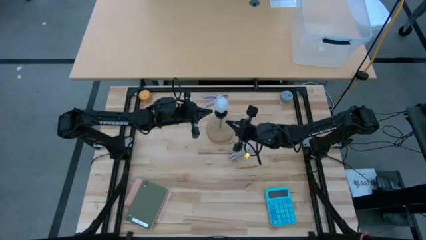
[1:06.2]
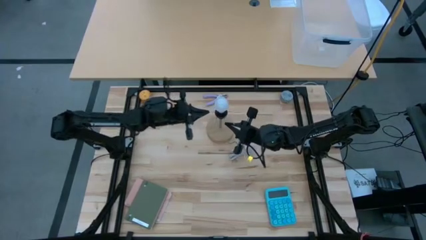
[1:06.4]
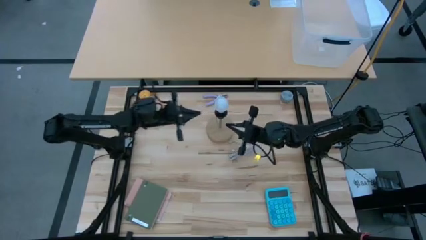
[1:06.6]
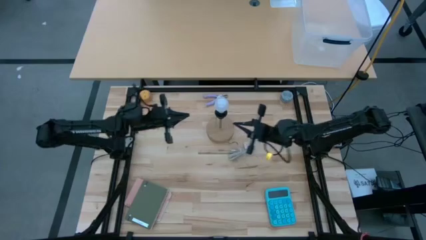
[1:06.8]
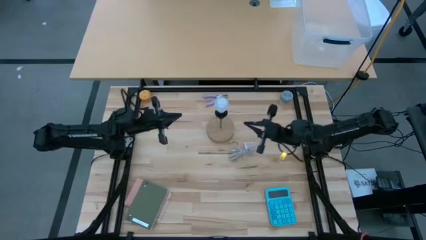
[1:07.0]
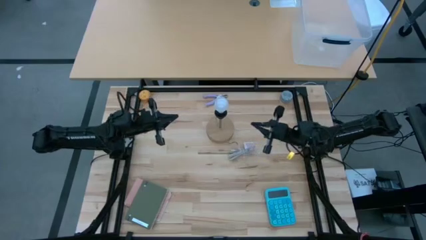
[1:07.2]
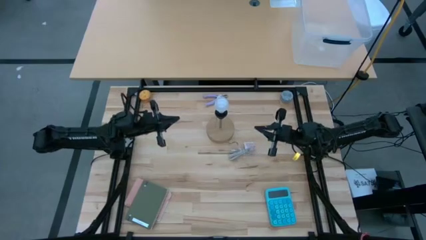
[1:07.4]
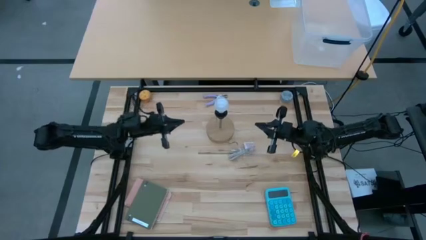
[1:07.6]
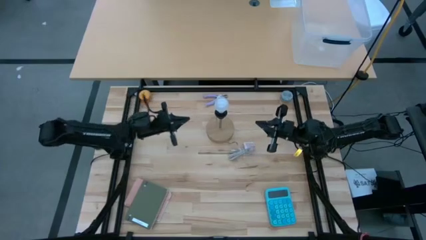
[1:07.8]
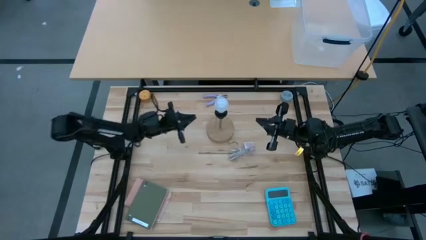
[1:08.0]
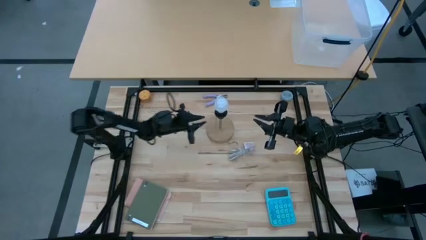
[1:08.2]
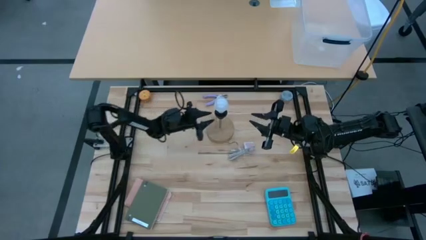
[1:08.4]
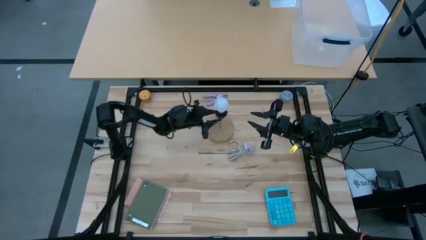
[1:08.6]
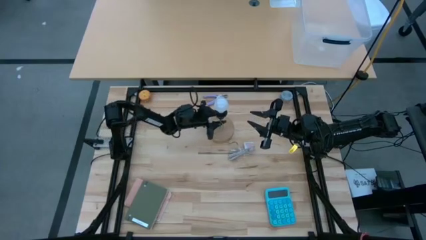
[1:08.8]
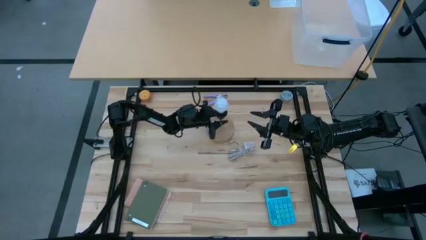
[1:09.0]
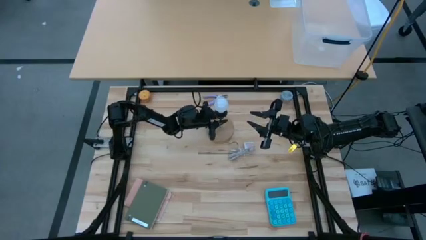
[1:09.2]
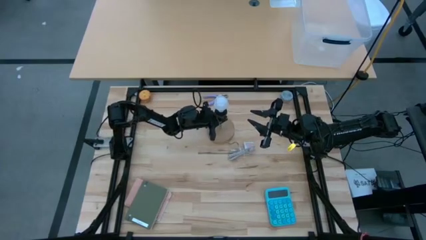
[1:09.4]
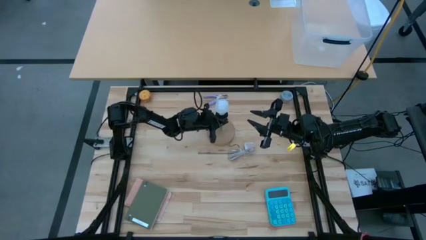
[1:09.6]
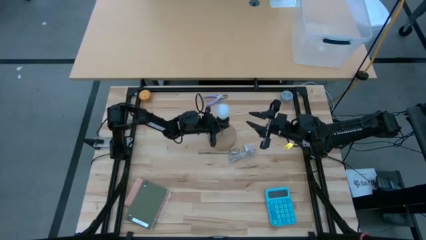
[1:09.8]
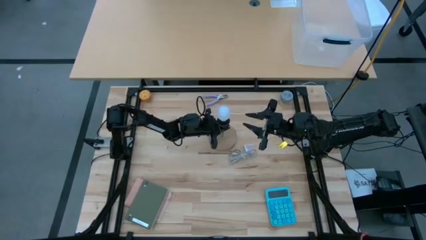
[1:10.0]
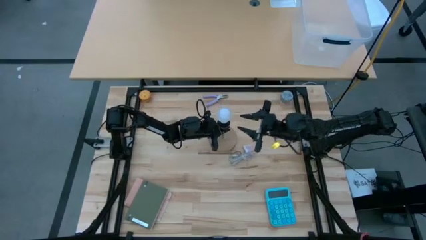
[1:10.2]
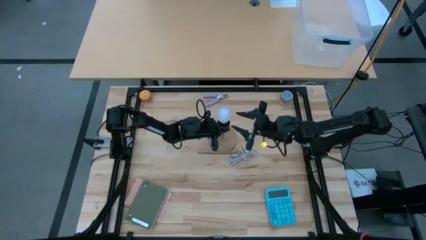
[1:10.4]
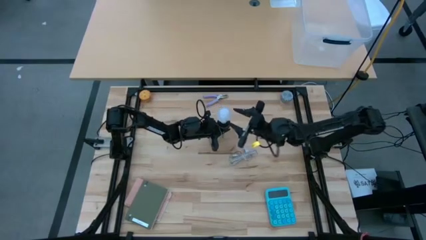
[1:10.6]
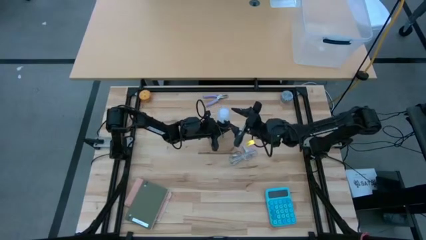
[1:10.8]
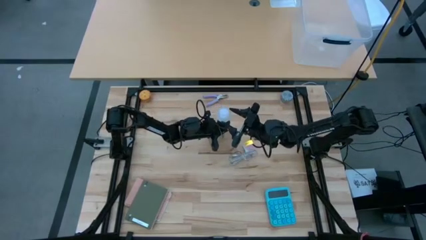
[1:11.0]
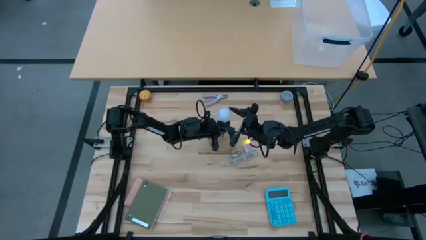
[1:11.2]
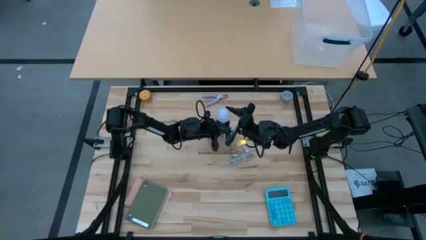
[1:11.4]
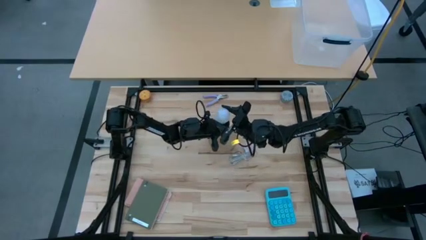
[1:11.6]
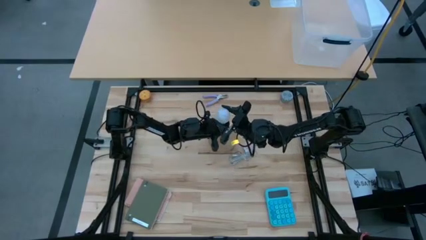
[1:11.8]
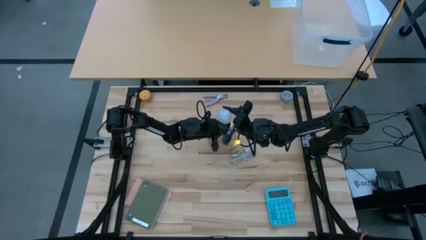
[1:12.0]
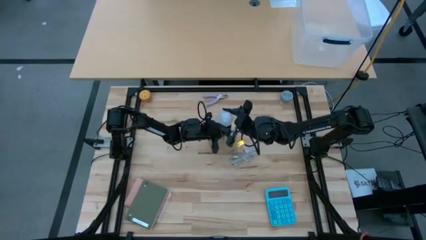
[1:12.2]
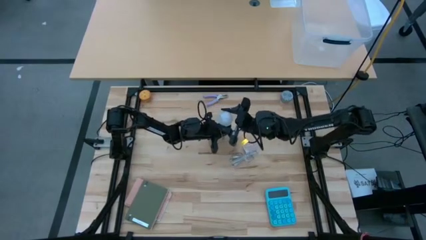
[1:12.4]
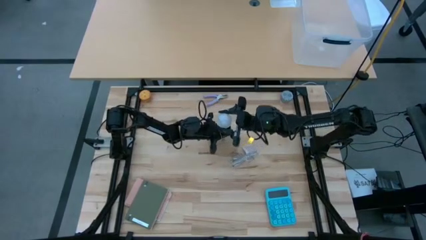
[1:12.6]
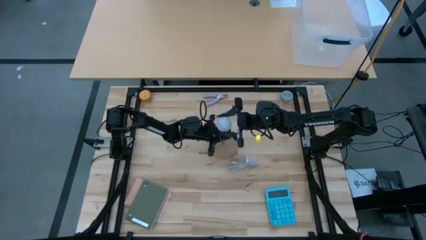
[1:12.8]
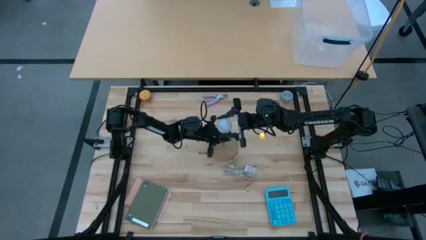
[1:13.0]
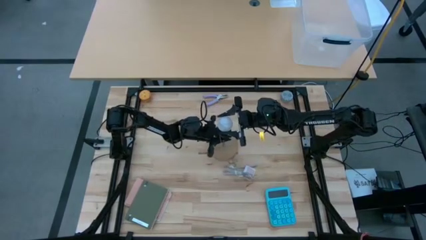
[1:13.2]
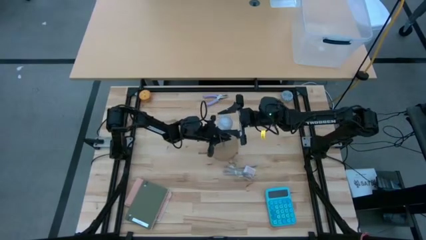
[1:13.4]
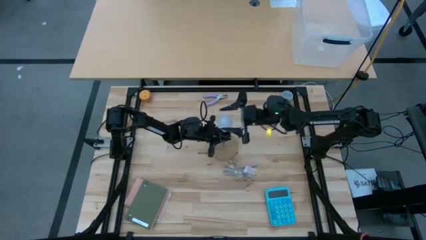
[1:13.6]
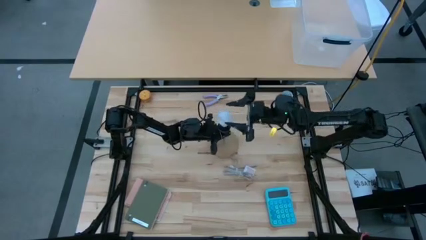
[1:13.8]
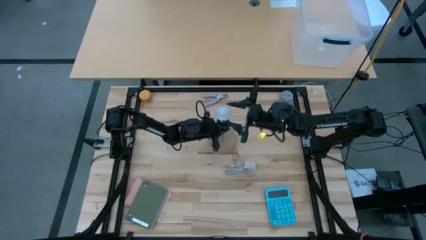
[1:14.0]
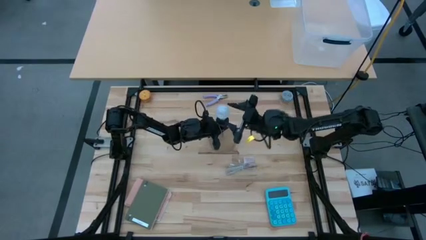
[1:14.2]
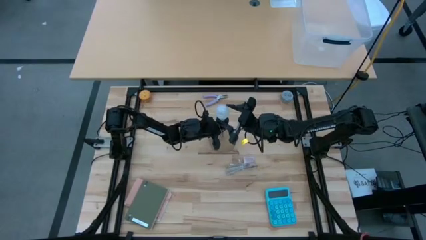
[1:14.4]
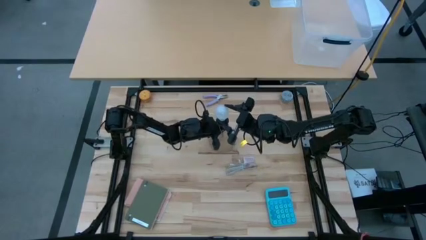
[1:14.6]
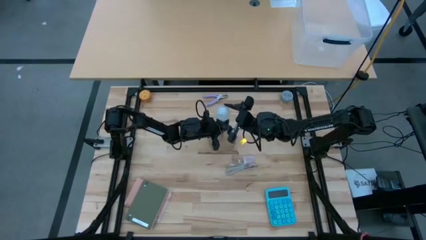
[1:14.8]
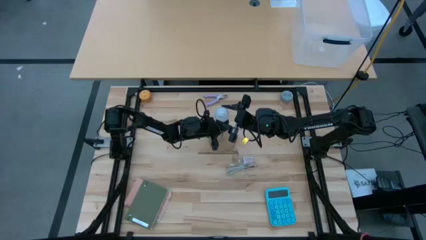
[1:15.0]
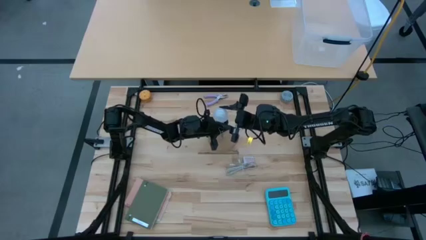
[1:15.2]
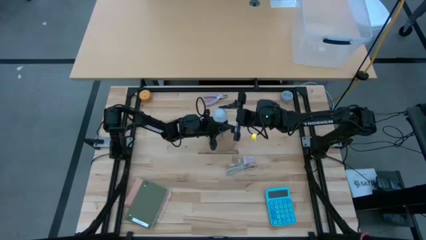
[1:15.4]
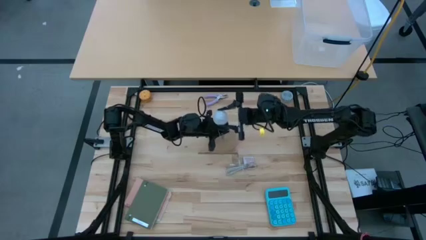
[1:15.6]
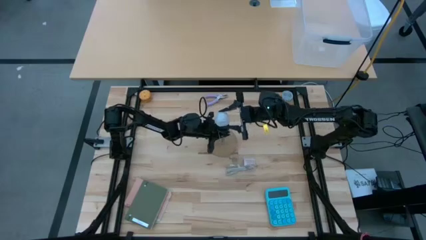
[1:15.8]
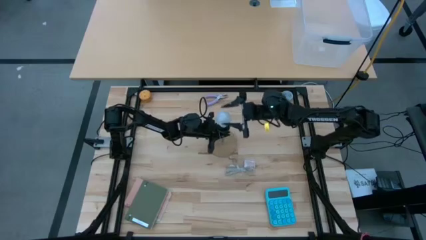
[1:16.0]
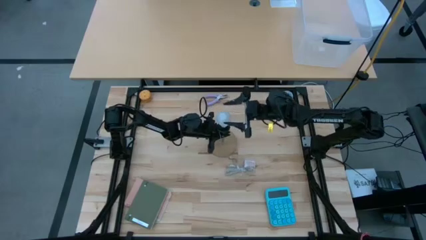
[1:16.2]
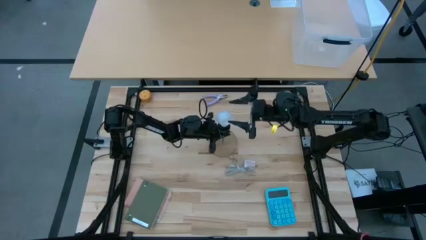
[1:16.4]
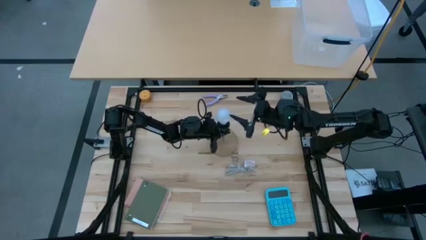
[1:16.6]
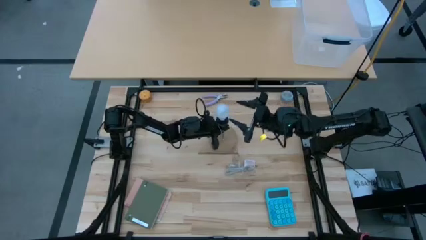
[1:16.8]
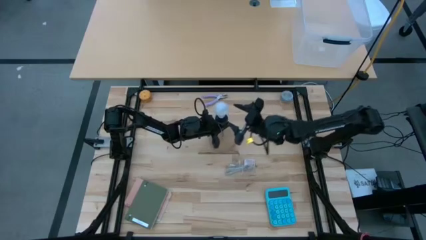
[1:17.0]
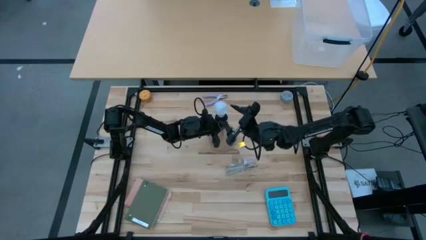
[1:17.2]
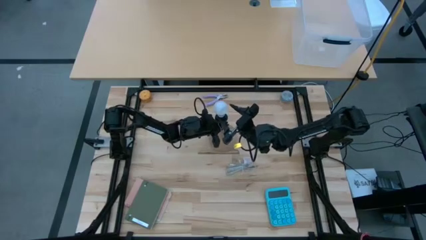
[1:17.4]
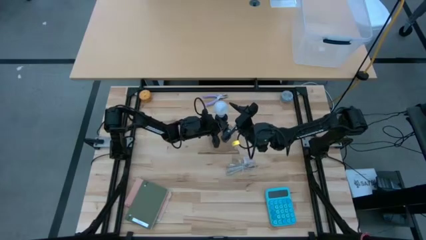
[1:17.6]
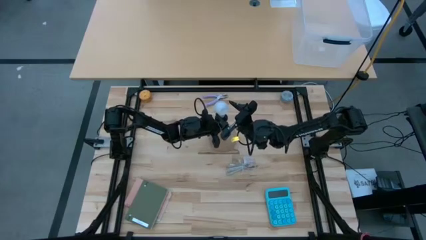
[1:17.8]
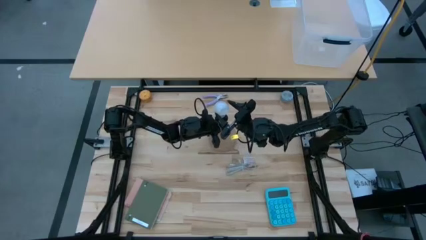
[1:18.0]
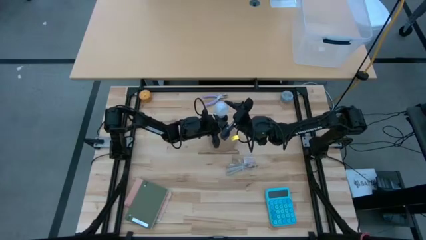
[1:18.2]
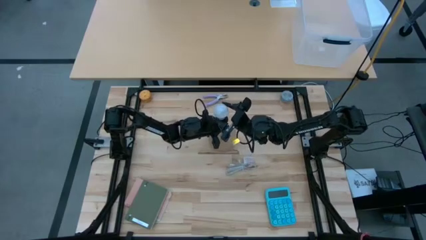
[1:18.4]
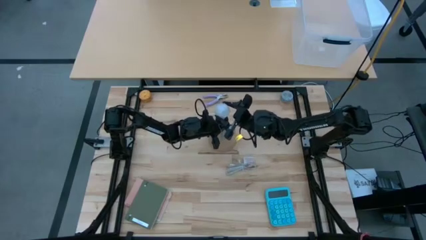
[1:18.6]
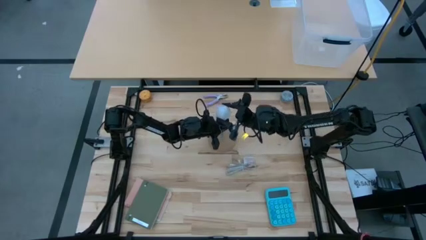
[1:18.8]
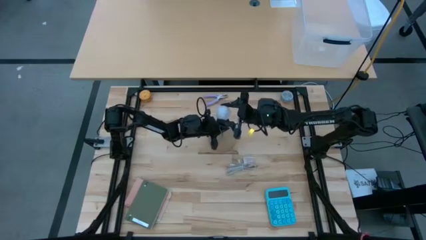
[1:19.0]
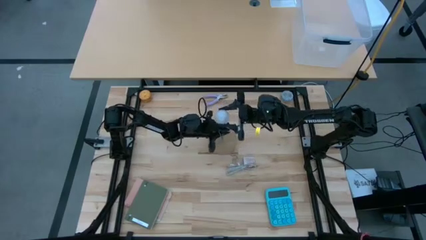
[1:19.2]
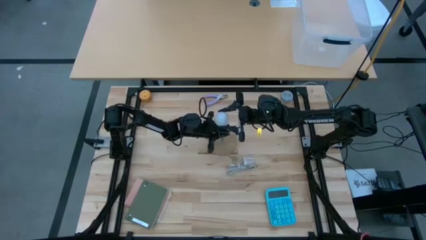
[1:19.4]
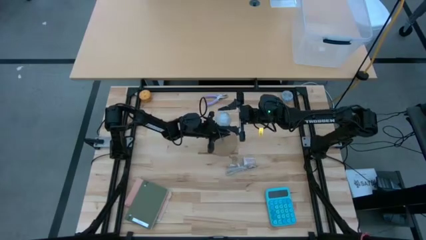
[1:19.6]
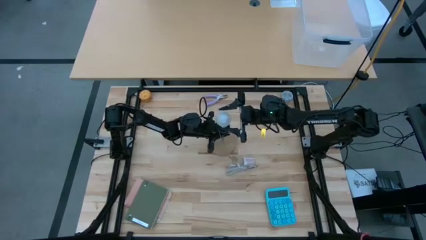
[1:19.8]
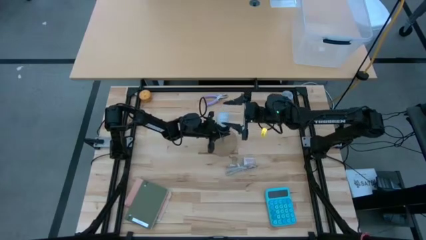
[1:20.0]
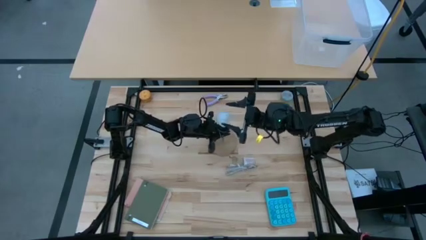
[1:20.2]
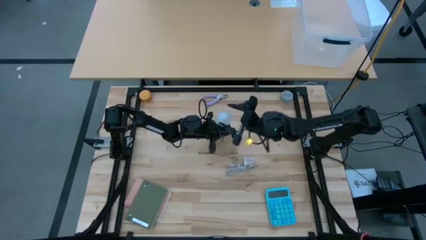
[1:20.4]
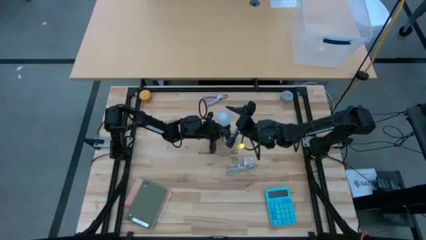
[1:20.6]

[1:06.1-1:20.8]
Task: Screw lightbulb
Remove the light bulb from the brown lamp

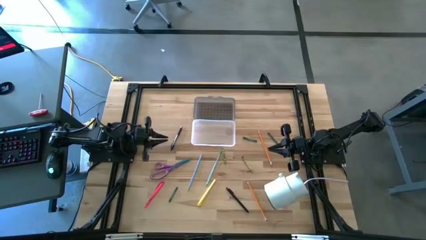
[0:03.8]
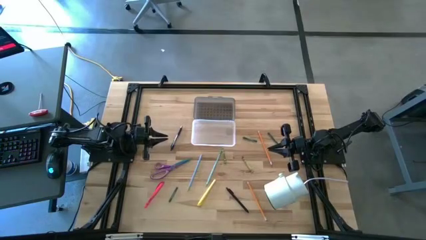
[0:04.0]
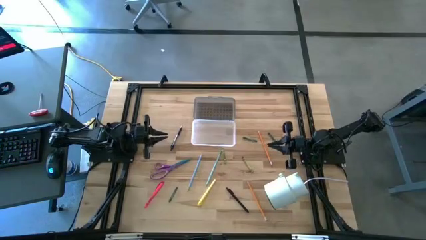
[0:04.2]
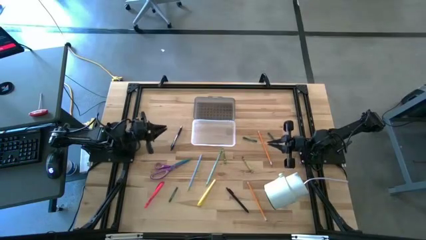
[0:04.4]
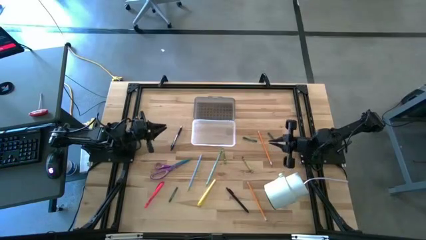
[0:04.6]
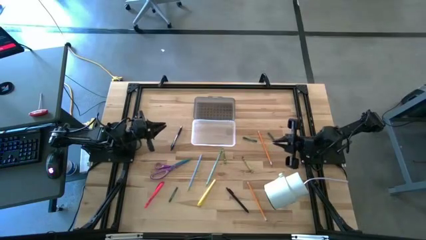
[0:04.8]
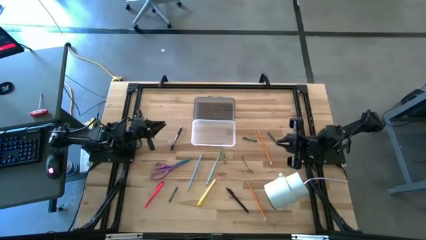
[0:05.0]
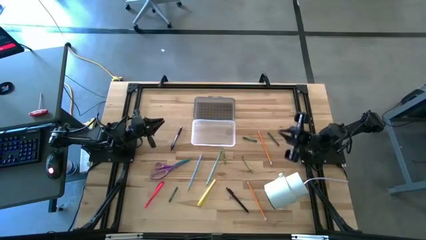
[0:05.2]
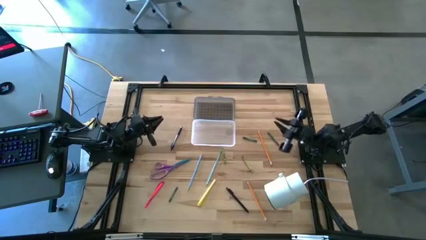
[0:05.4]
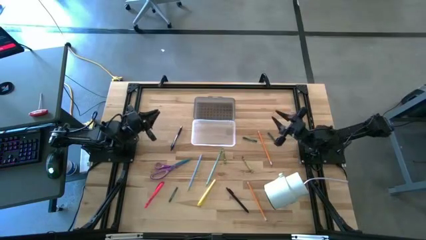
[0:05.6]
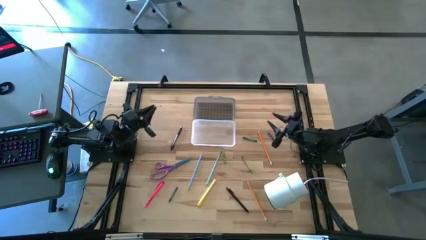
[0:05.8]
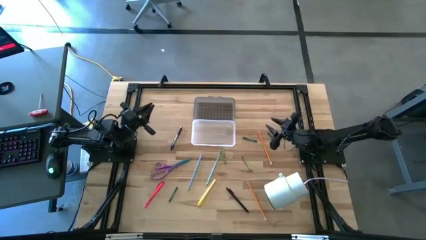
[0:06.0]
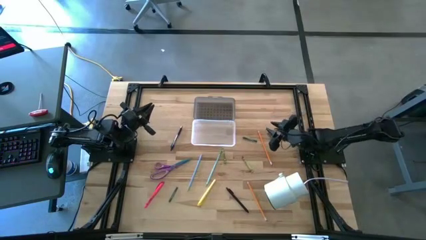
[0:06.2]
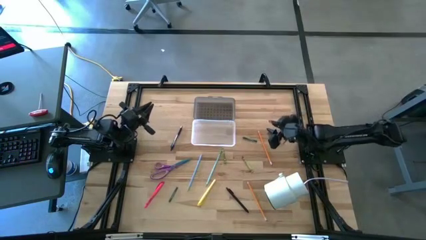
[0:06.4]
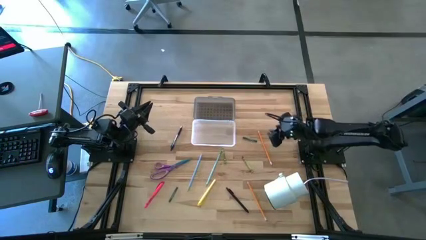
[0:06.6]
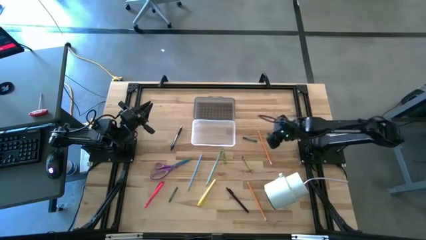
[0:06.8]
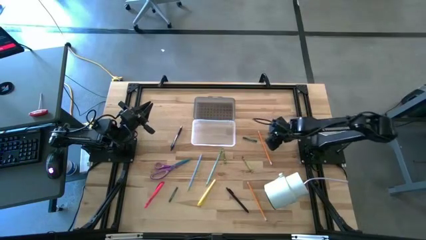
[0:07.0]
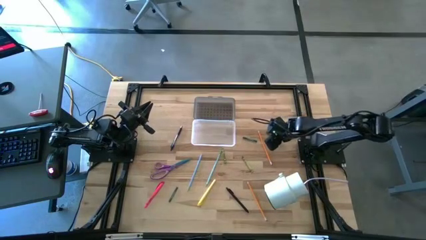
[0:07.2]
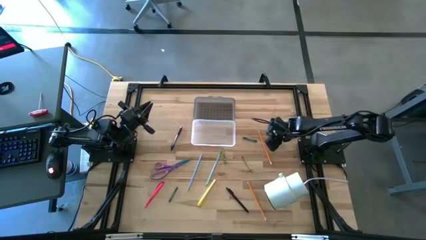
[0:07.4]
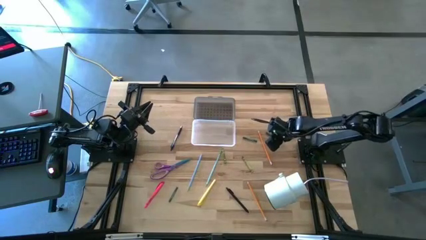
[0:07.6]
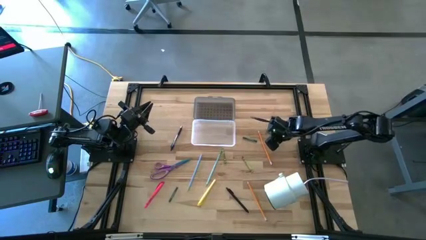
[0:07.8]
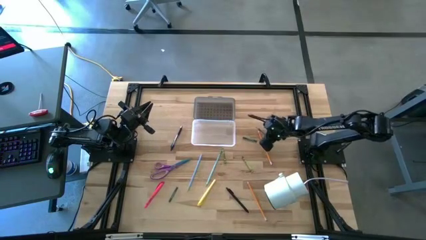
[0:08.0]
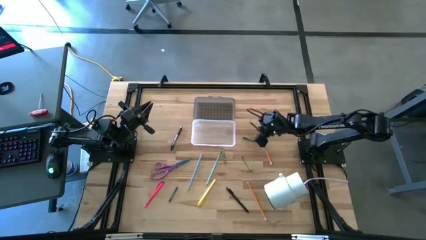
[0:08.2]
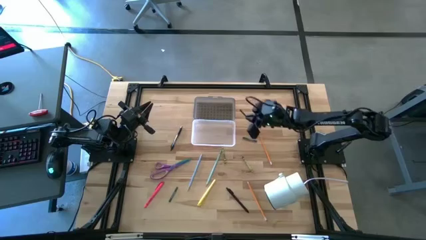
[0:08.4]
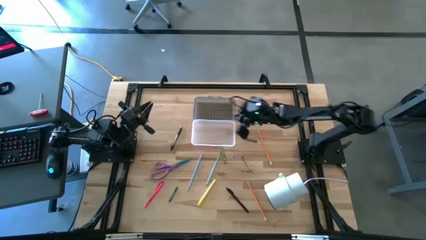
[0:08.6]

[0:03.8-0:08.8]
Task: Pick & place school supplies into a supply box
Put the top right dark green crayon into the black supply box
